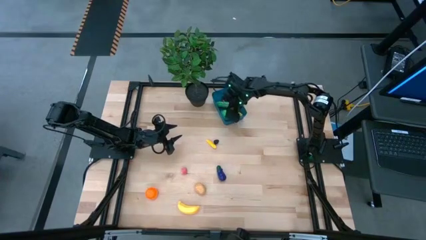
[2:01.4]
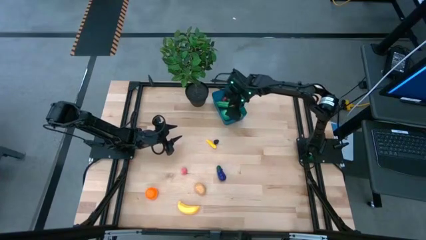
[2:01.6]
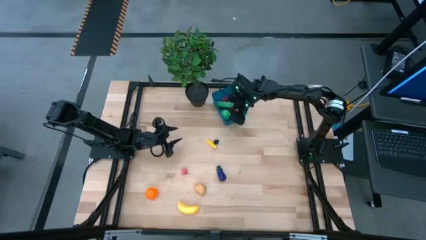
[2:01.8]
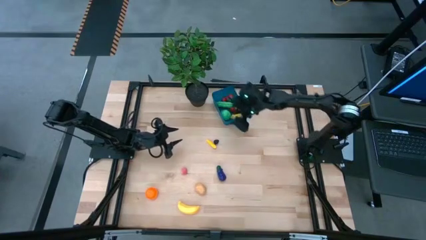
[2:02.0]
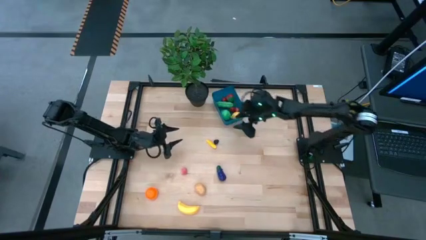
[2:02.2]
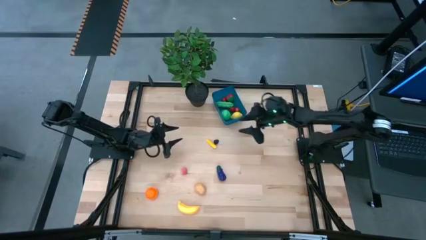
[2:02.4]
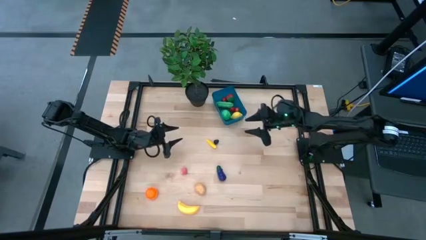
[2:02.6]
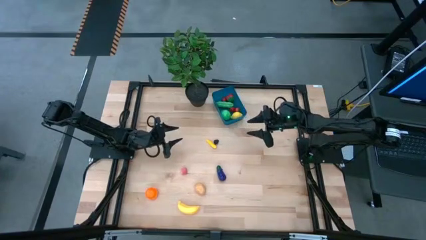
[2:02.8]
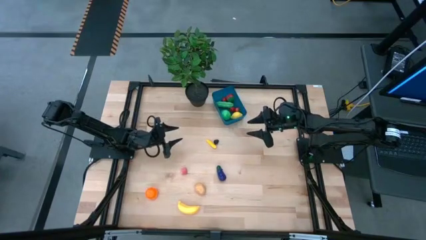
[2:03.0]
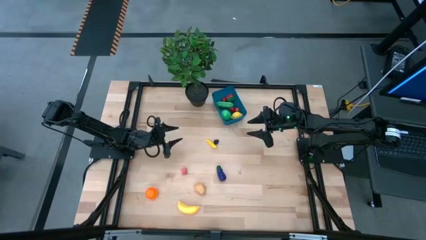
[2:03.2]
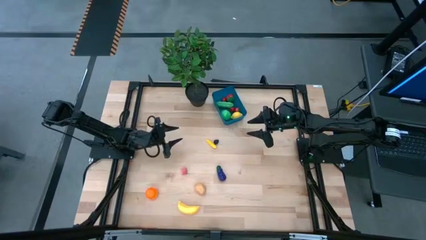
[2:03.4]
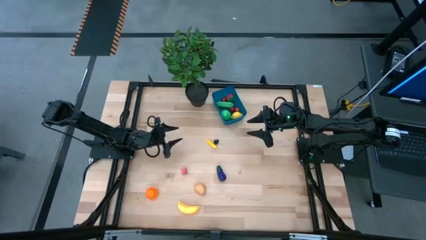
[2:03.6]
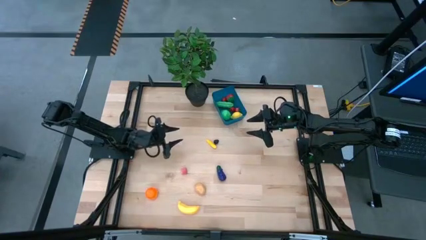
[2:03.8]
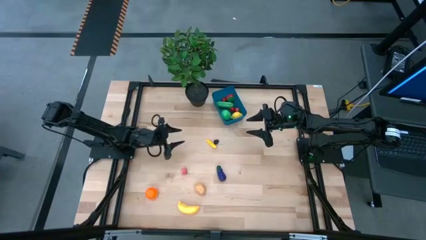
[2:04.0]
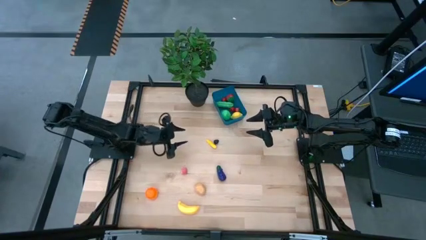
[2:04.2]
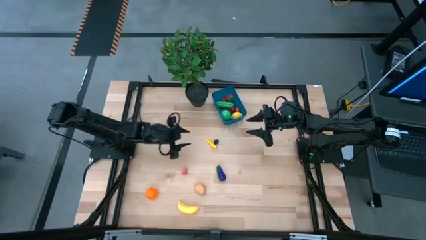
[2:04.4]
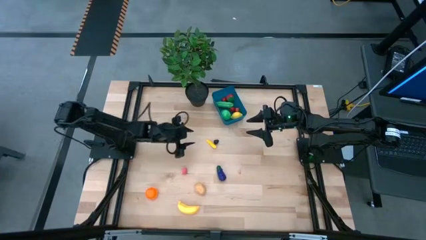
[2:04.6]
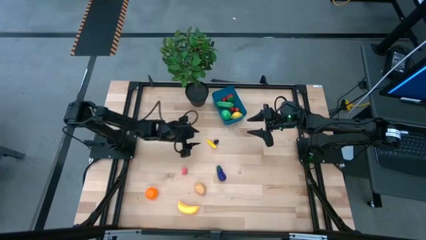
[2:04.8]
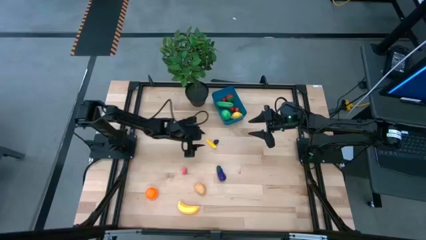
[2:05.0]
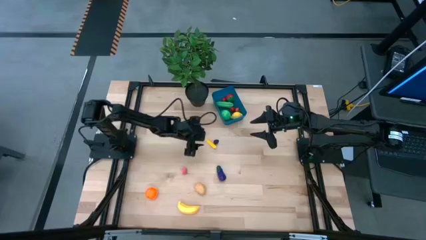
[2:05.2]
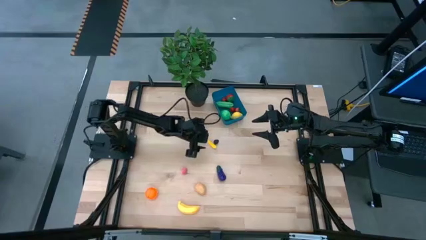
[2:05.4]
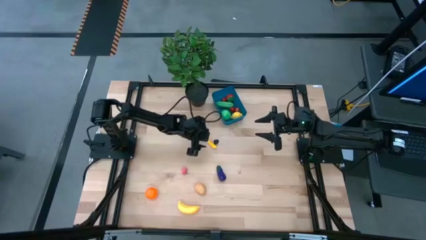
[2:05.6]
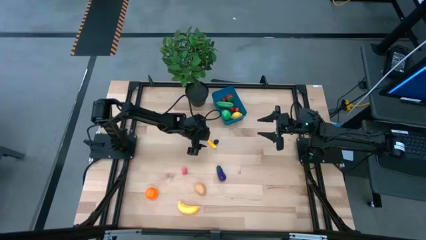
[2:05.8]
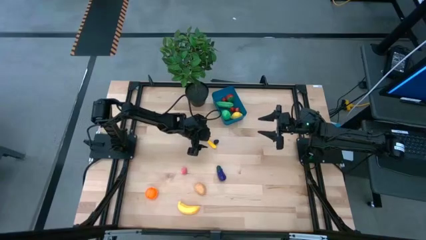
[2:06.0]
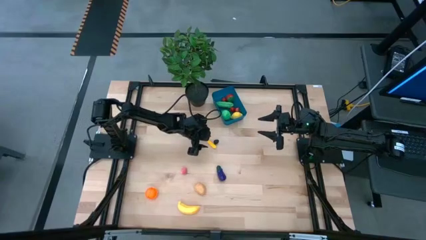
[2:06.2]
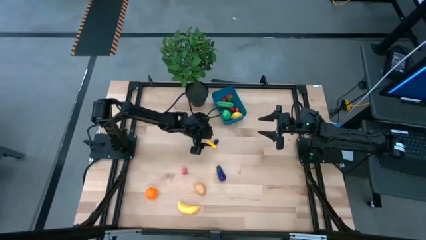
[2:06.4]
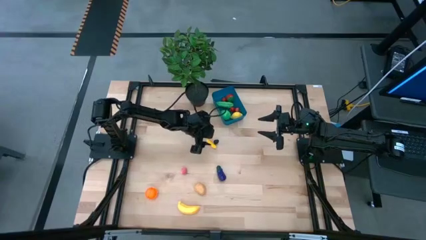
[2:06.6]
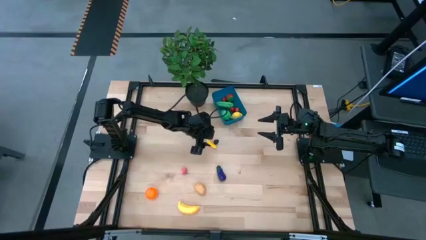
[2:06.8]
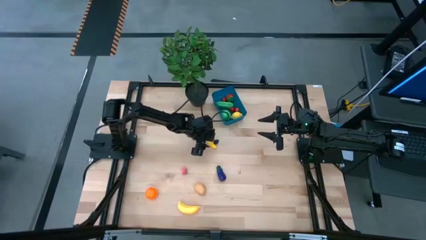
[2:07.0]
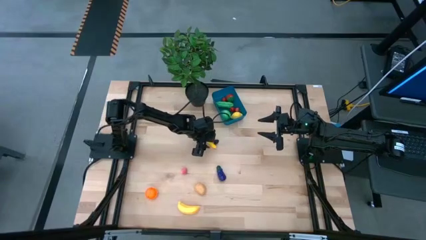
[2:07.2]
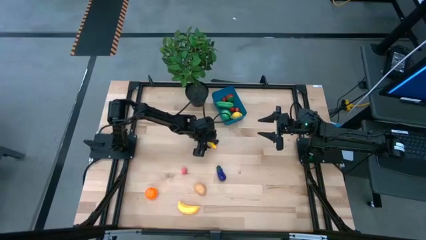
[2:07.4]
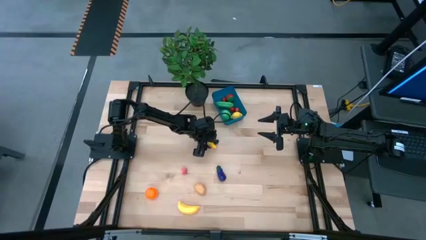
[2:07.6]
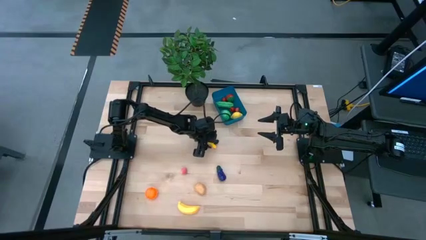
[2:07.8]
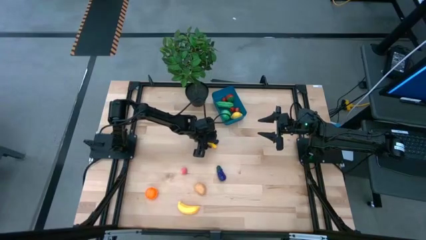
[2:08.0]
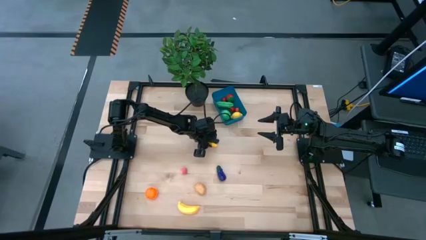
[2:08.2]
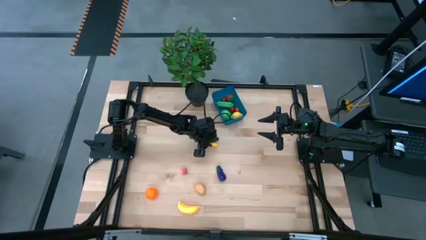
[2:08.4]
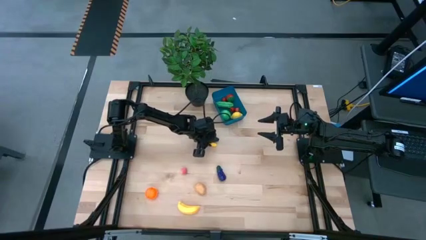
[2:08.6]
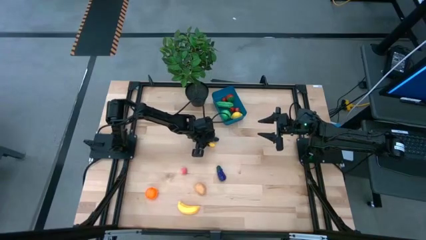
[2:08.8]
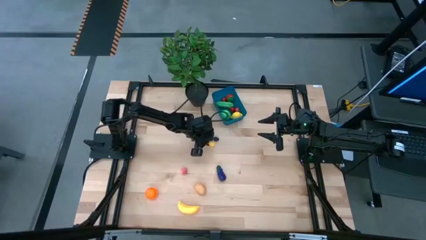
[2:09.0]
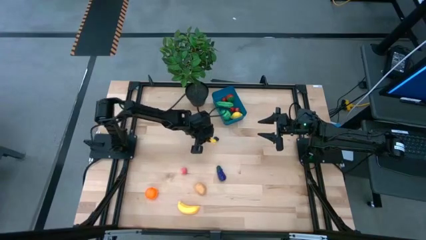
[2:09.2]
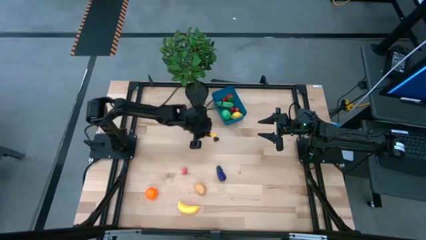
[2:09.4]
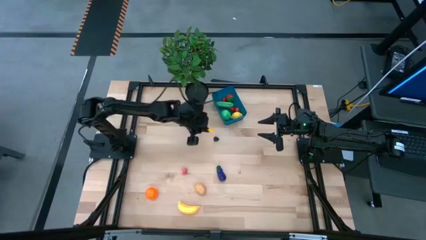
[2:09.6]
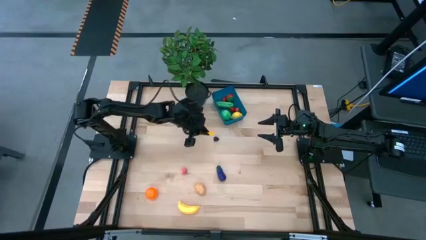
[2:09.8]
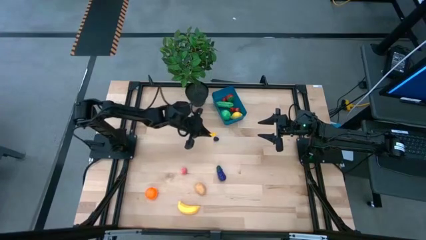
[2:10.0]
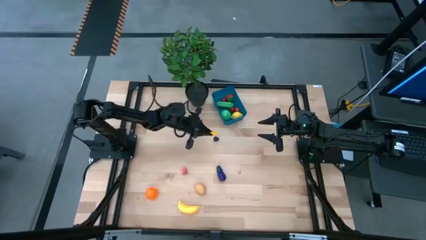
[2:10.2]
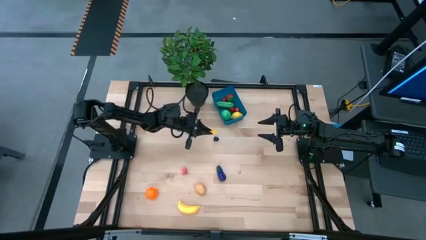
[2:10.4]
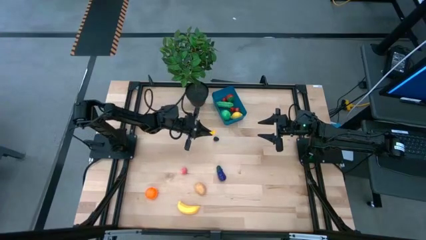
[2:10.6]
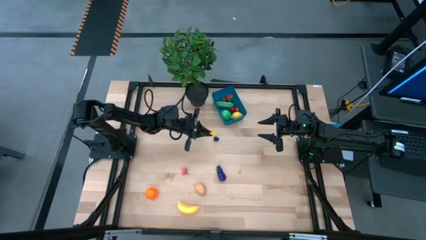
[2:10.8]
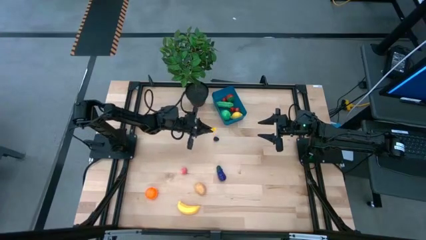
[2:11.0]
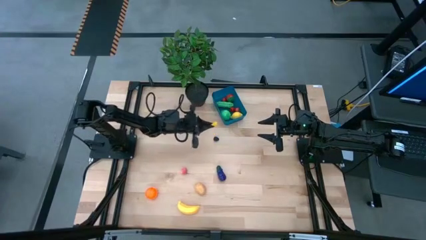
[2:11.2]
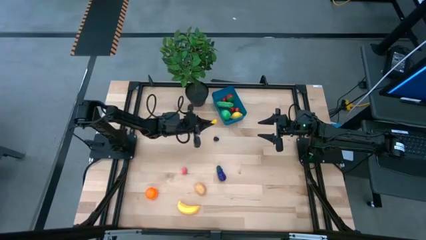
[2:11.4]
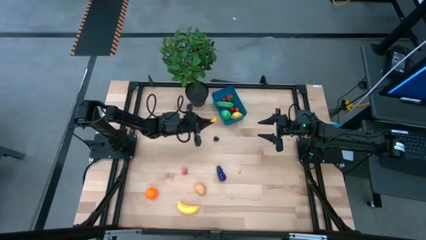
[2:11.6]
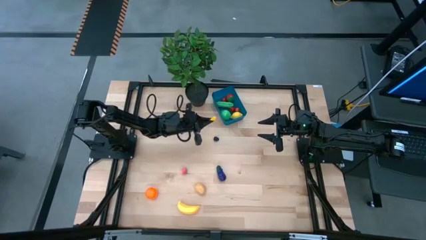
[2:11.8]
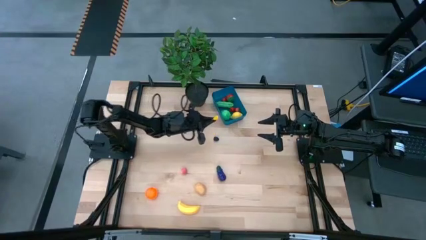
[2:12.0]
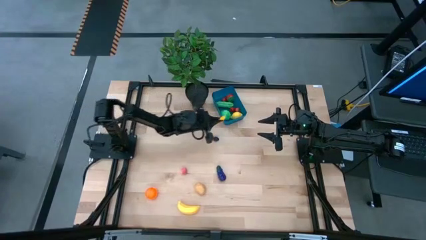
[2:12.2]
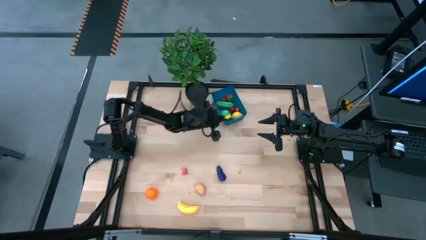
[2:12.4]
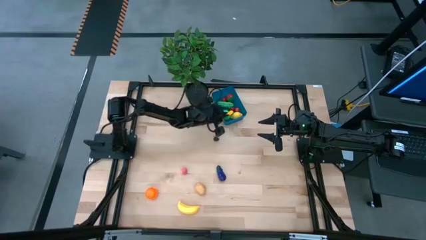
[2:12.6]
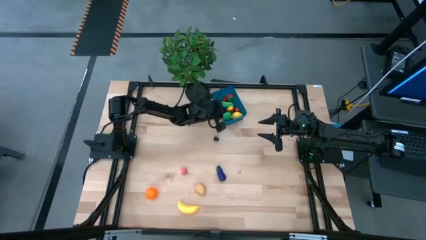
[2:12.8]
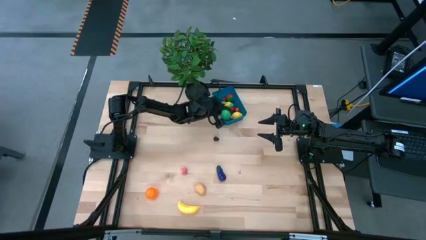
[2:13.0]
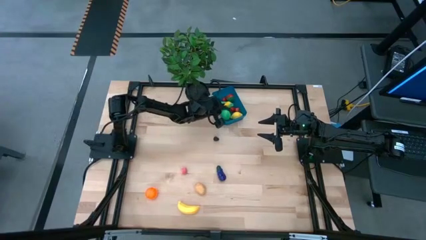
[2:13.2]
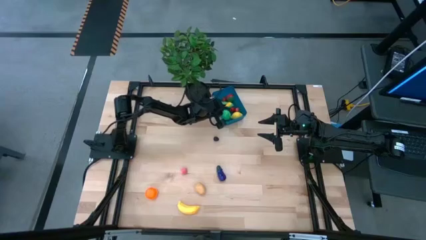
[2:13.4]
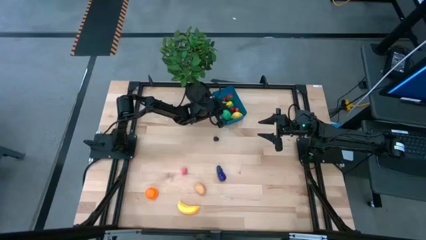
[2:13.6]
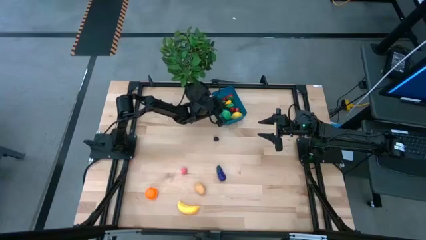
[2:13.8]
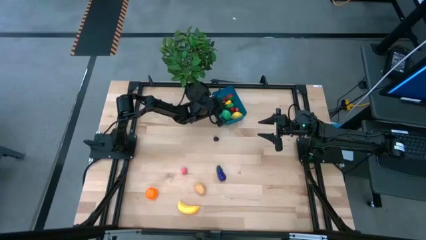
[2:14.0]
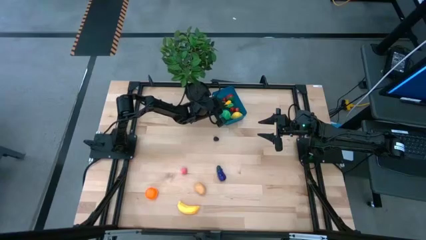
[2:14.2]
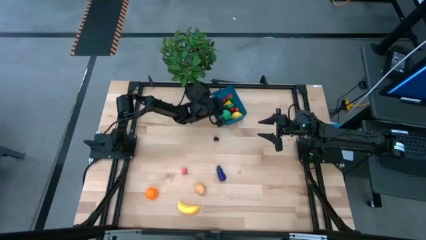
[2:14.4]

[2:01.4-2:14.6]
Task: Pick and placing Produce into tupperware
Put the corn into the blue bin

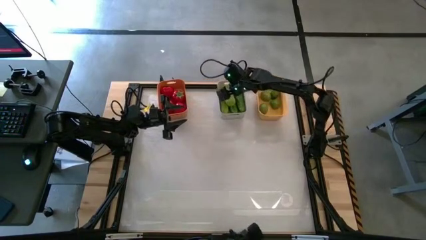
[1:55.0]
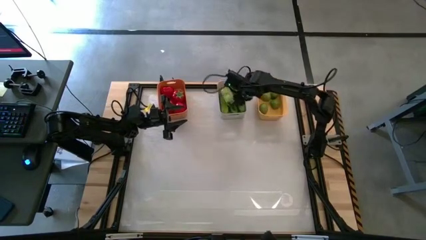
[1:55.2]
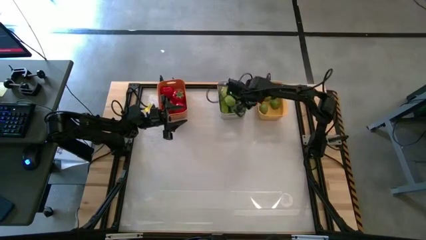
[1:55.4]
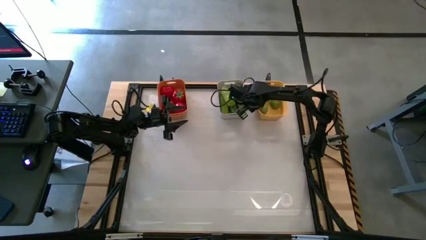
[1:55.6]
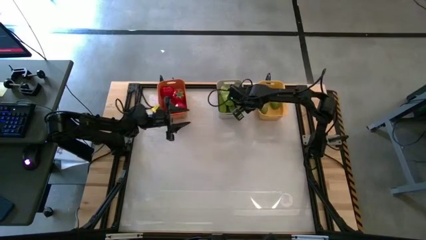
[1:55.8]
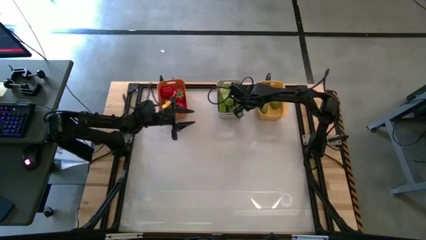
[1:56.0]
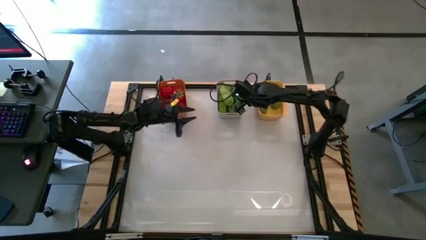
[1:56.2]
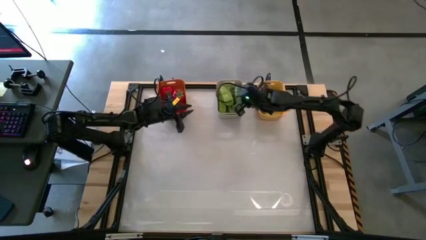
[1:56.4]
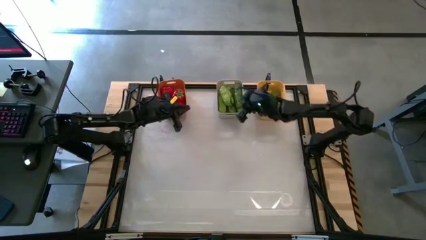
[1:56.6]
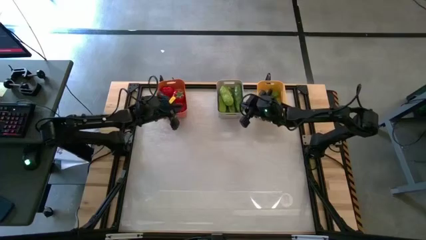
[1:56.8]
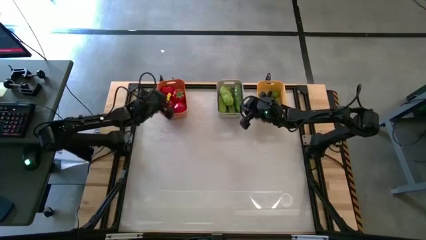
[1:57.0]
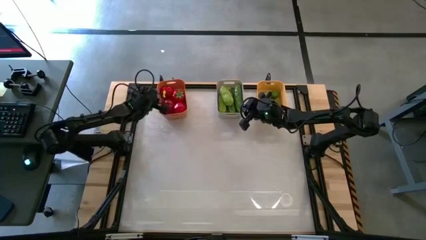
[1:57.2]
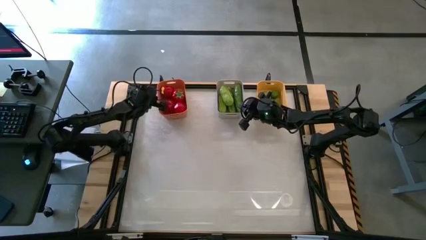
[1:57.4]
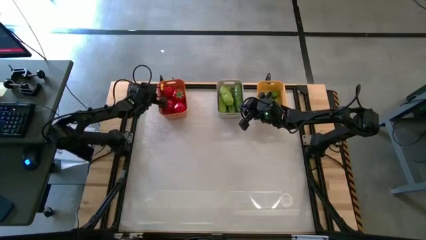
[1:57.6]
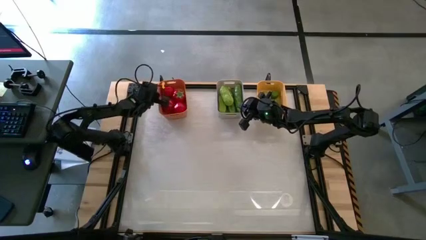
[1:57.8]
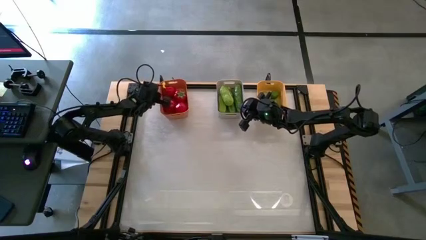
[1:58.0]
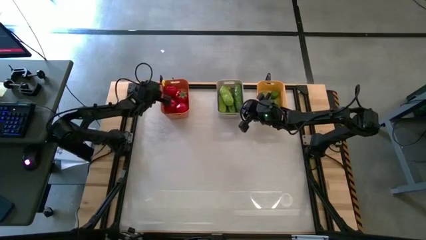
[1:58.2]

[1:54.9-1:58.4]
Task: Sort produce into baskets
Adjust the bins
